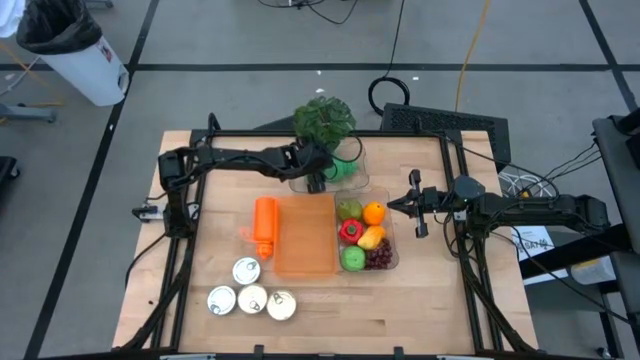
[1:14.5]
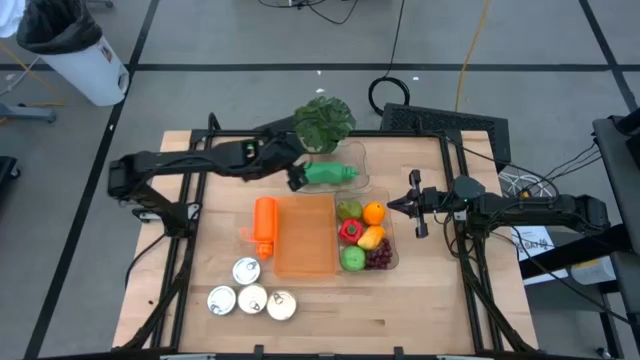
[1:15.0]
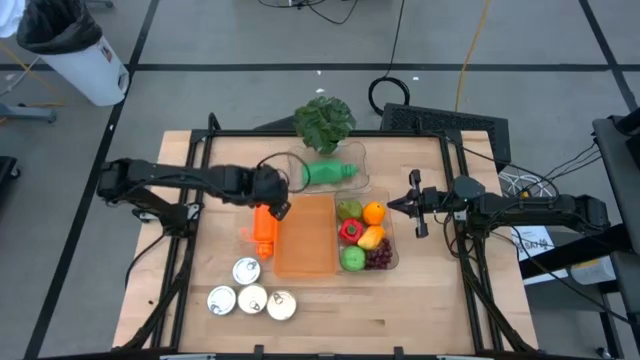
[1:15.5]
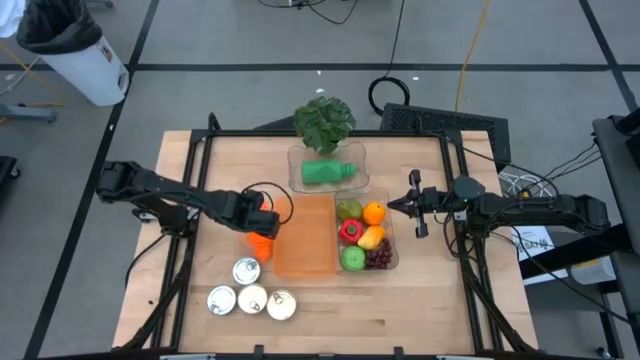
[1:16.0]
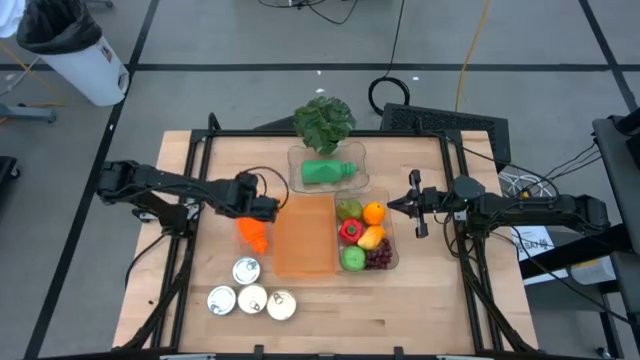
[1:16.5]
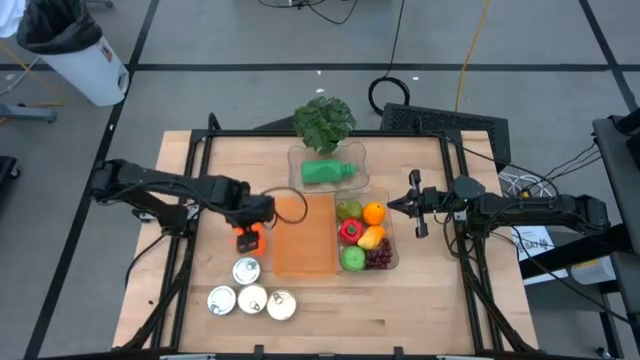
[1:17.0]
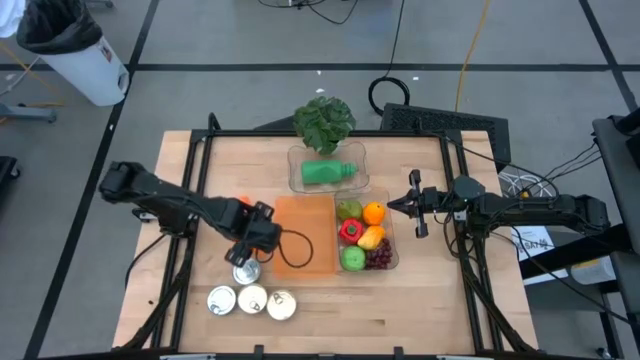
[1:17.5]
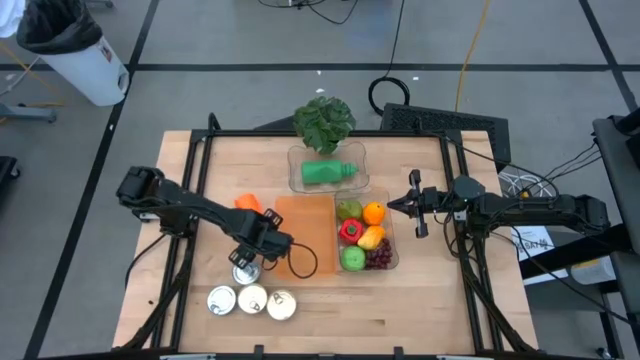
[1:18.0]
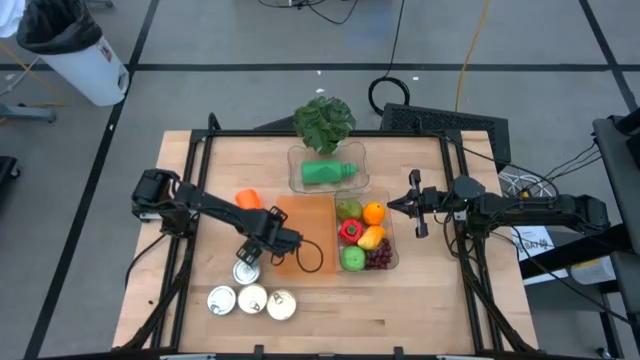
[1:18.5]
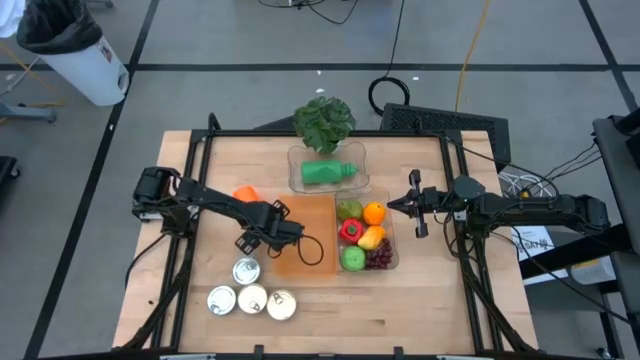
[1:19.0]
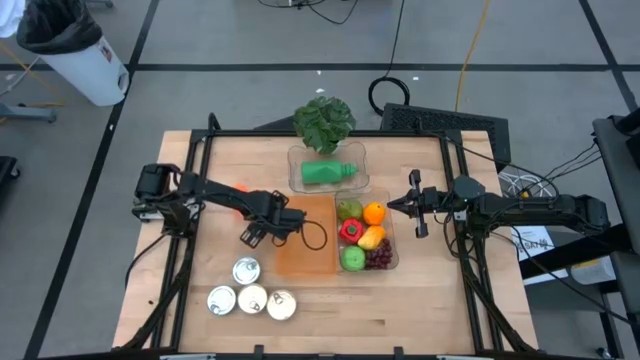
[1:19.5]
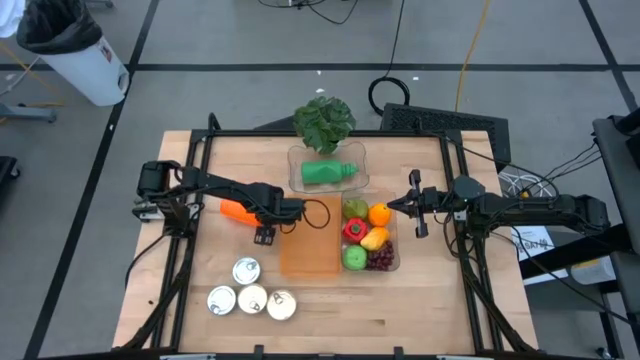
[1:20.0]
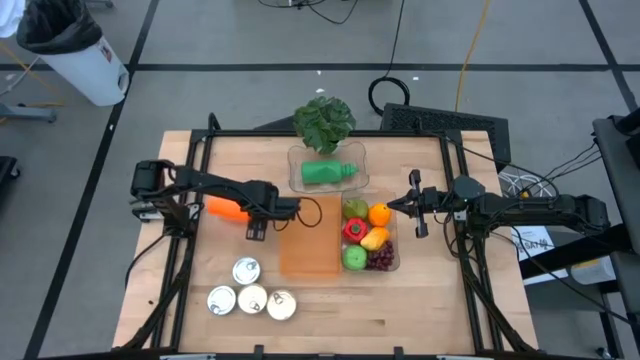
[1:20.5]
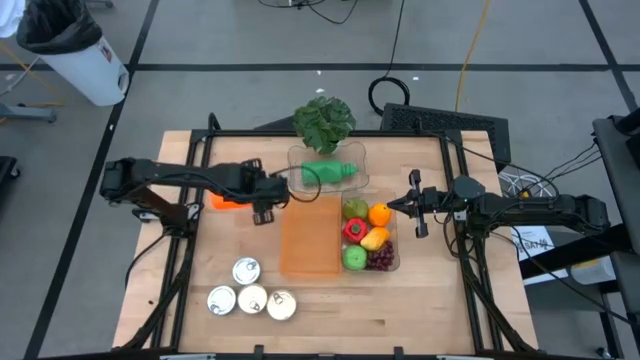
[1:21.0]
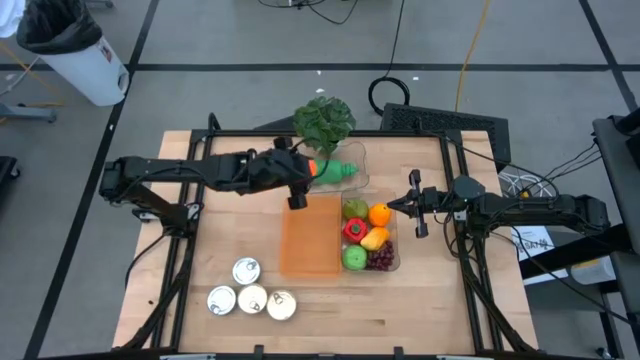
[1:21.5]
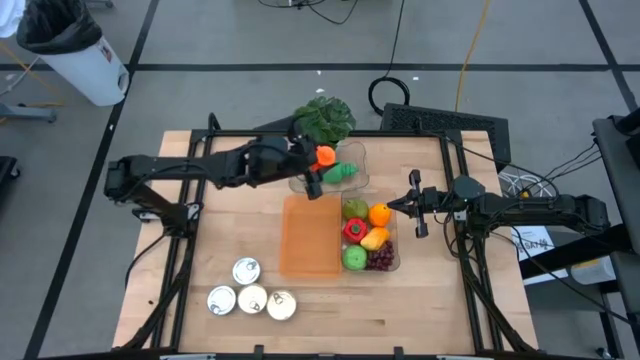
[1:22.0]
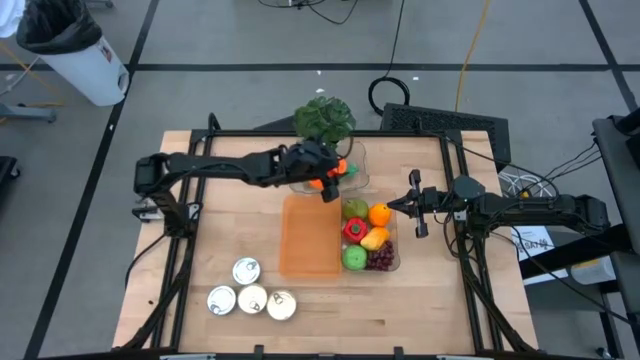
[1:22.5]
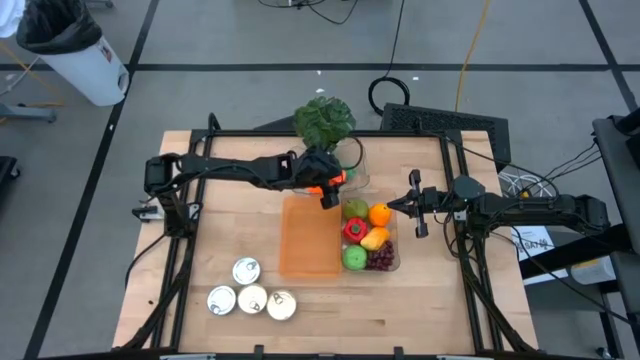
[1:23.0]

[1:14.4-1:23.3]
Task: Pick & Place Food Item
Put the orange water bottle into the top transparent bin

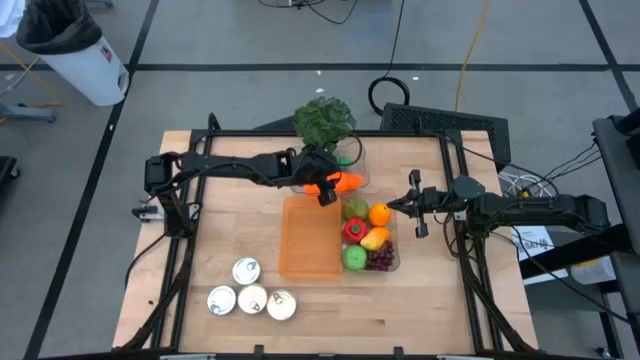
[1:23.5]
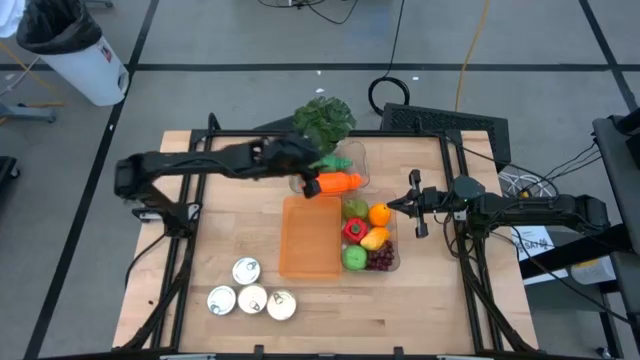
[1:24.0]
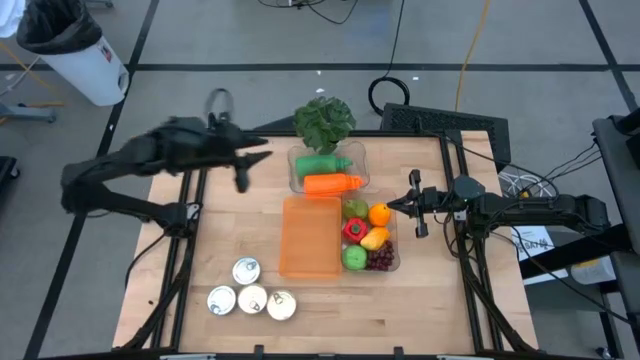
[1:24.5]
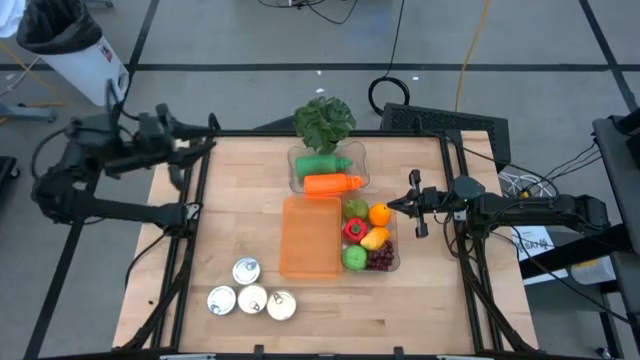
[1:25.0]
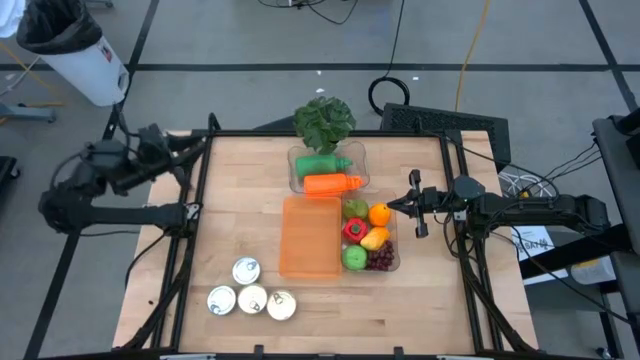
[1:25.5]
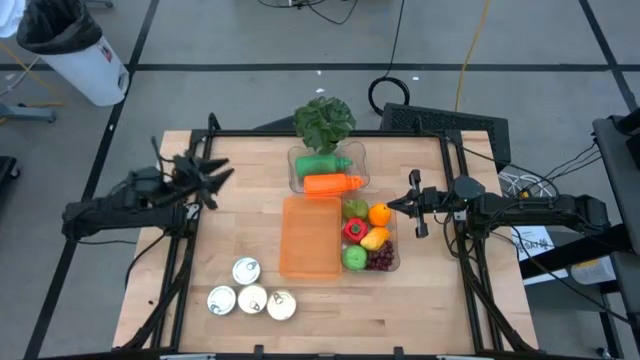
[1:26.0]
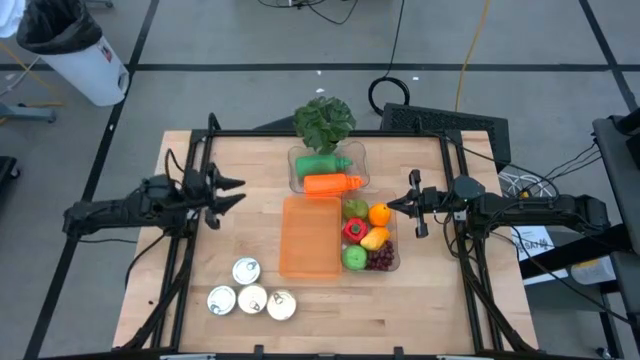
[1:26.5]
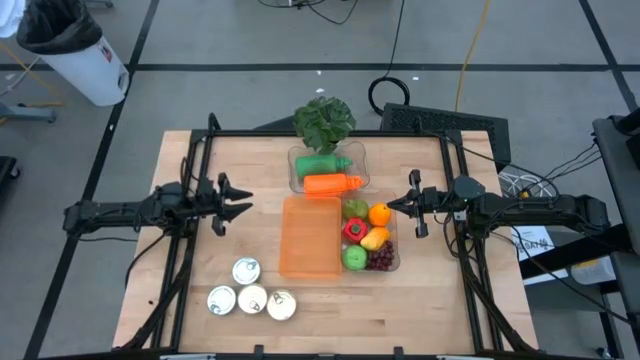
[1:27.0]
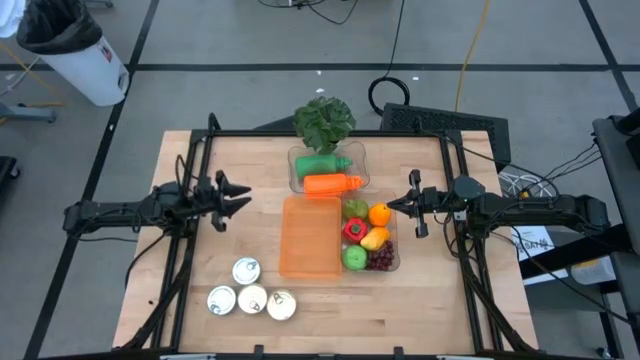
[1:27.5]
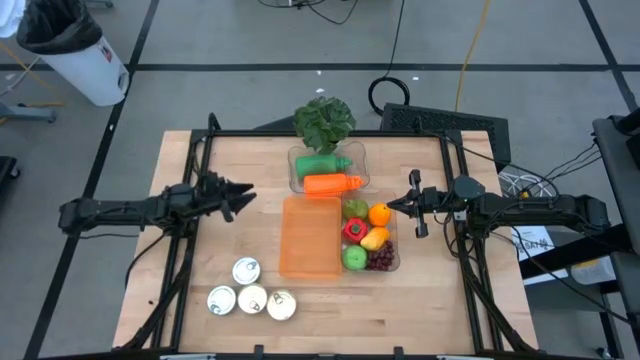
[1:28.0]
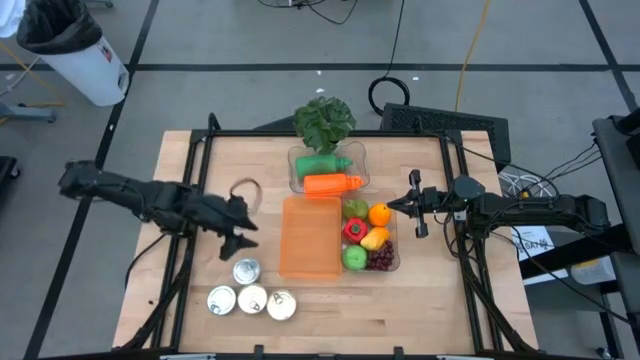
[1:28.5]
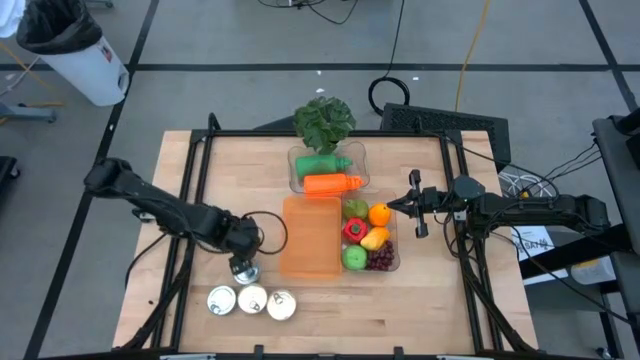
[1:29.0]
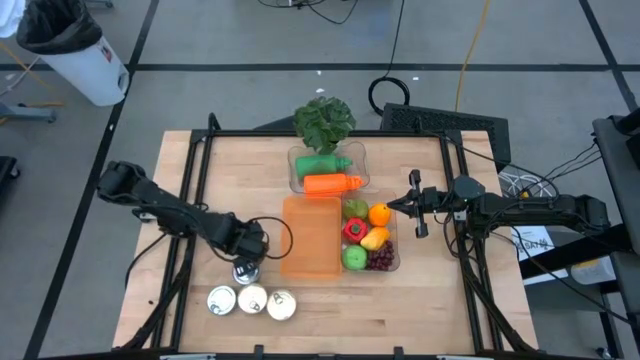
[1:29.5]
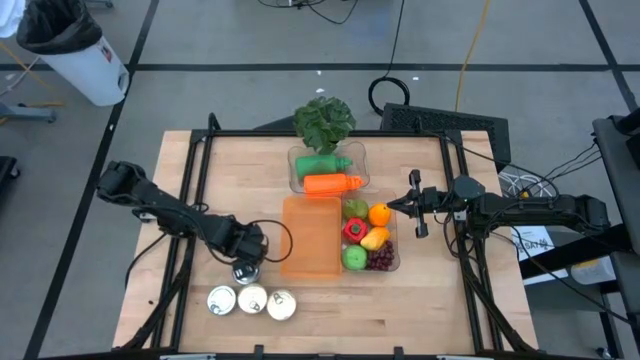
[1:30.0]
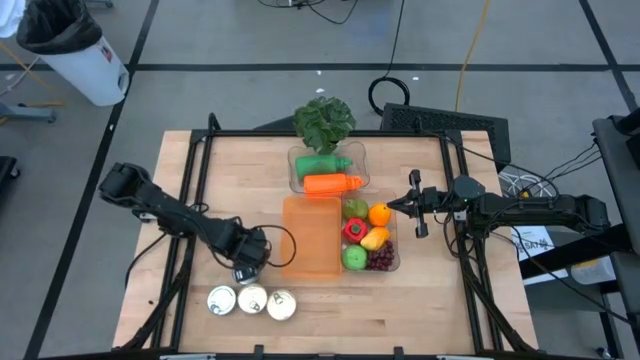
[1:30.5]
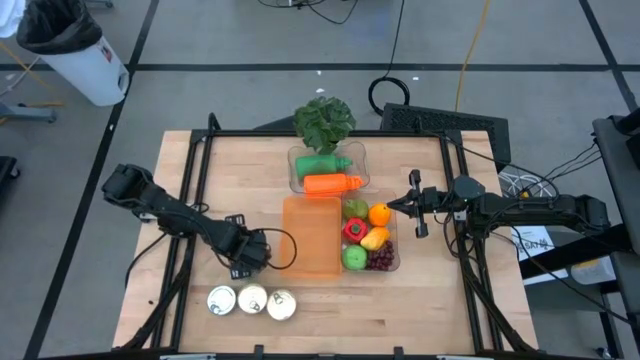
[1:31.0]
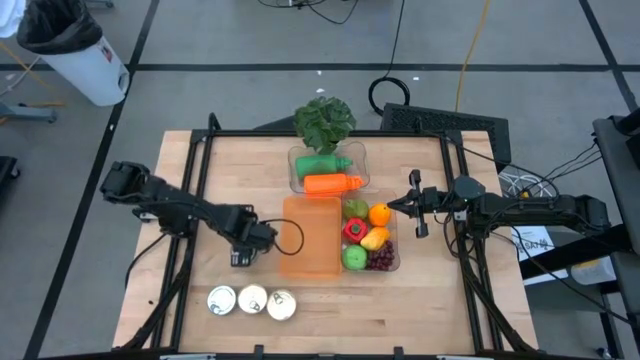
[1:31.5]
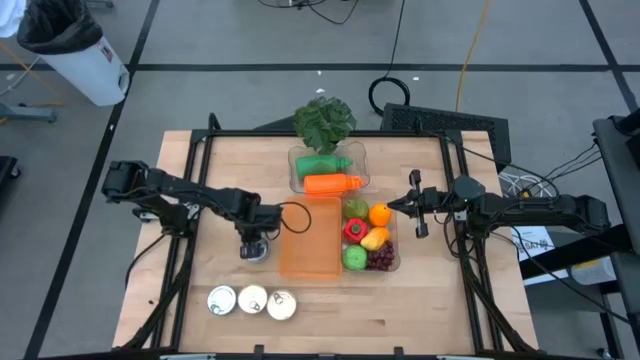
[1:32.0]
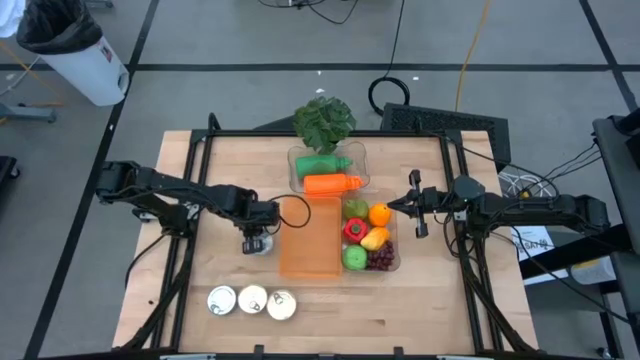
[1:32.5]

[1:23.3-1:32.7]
Put the top green tuna can into the orange bin

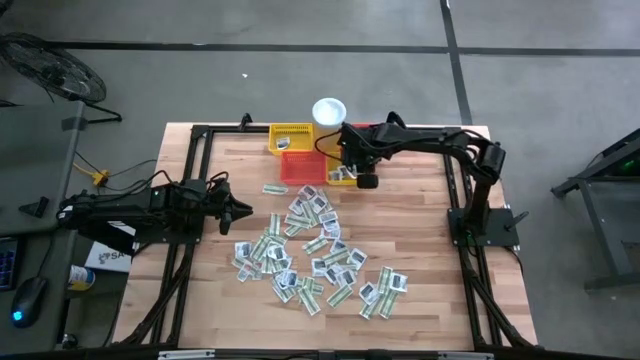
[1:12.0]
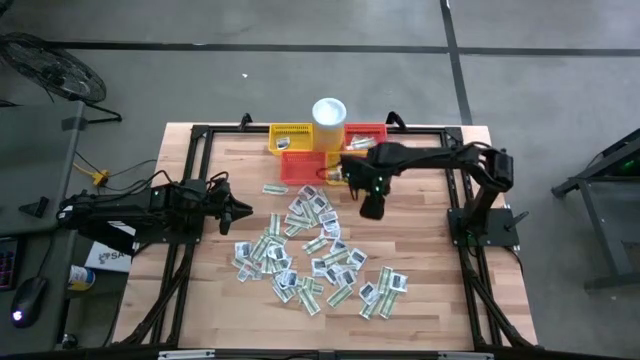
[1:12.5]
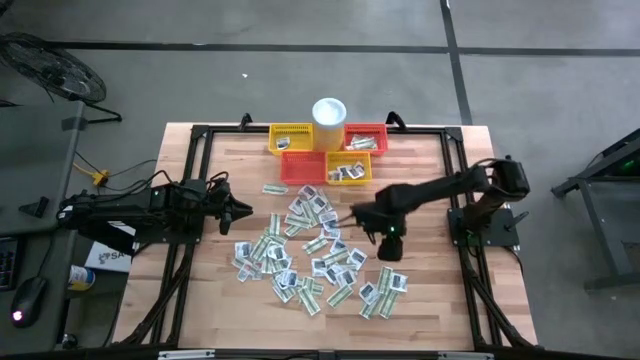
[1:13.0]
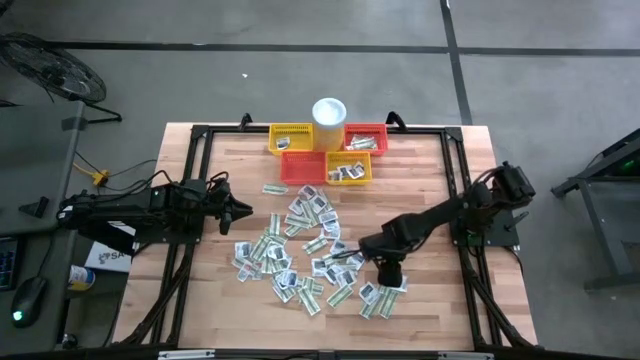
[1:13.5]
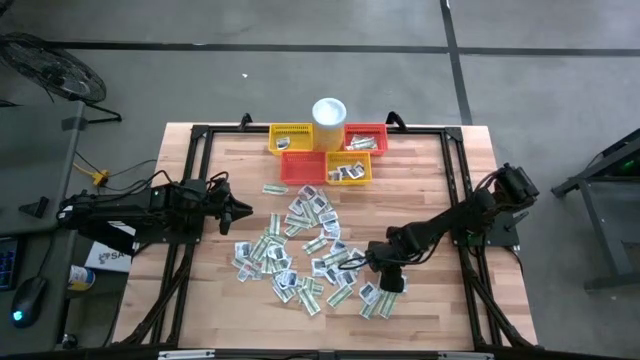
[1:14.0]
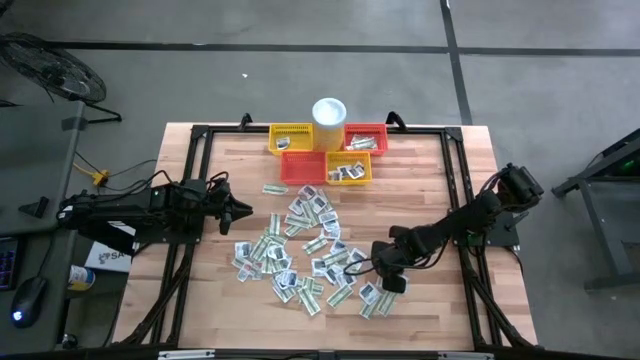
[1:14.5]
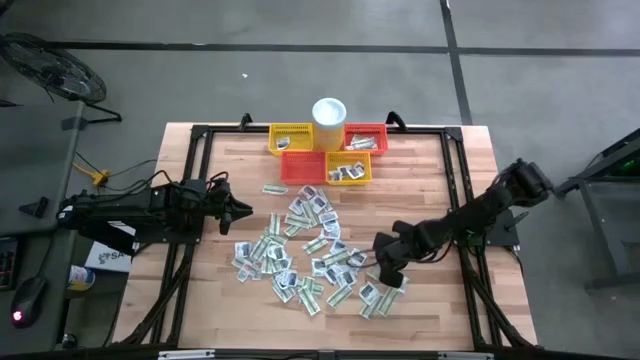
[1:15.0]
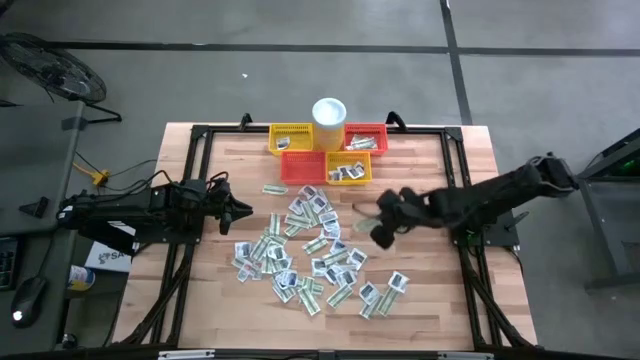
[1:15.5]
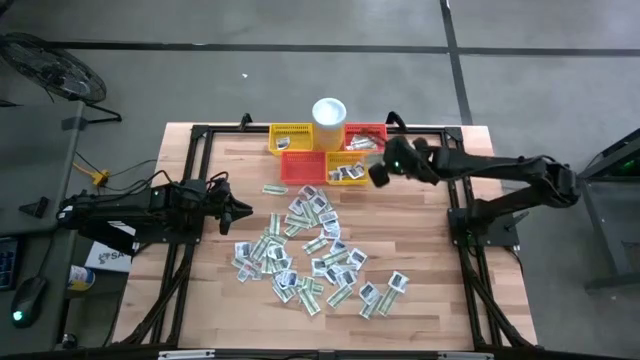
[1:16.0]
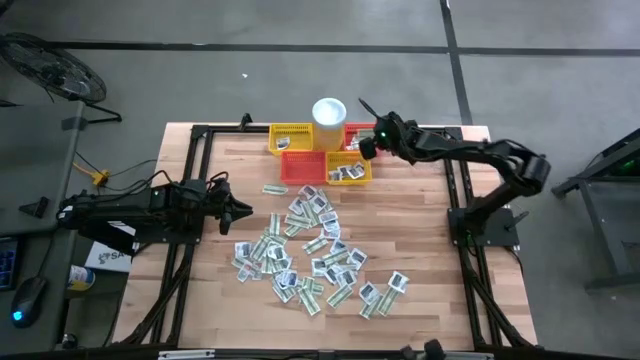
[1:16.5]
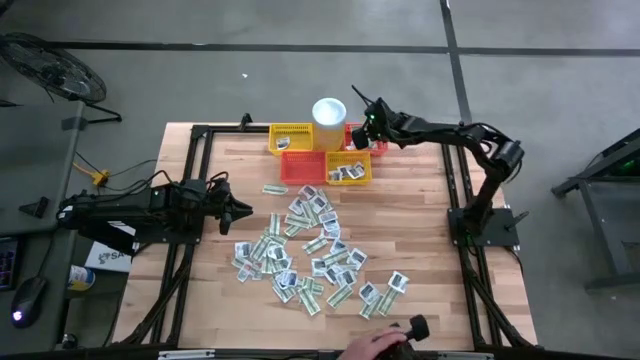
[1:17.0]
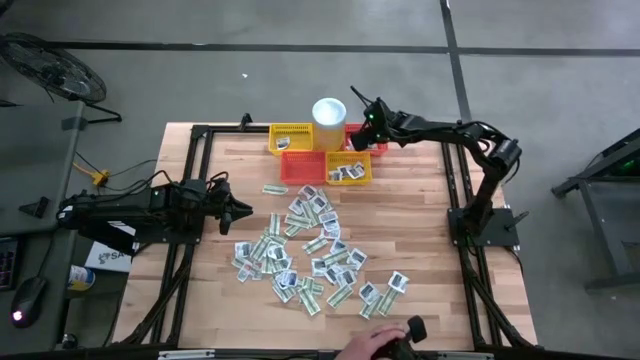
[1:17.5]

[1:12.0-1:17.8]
Task: Pick & Place First Aid Supplies
Put the green bandage pack into the top orange basket
